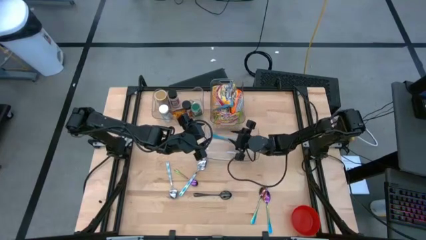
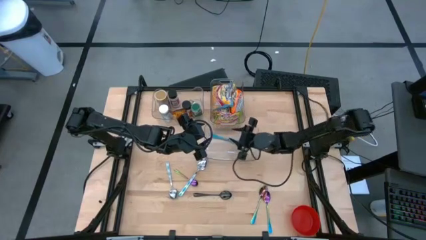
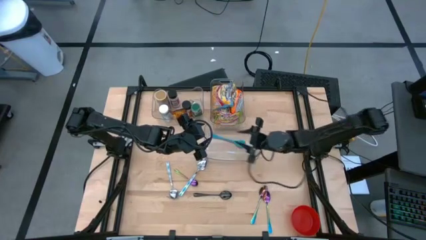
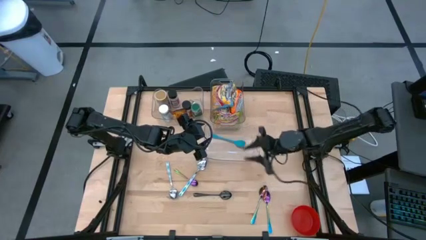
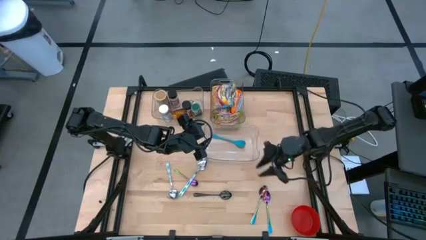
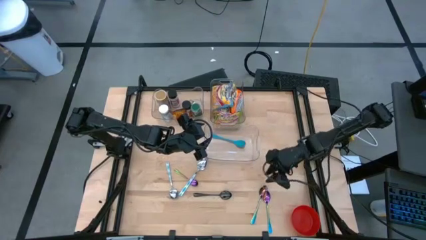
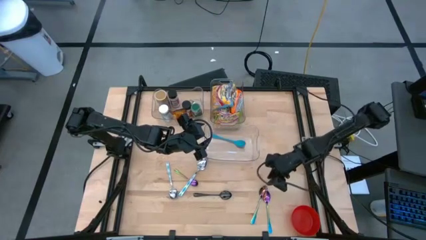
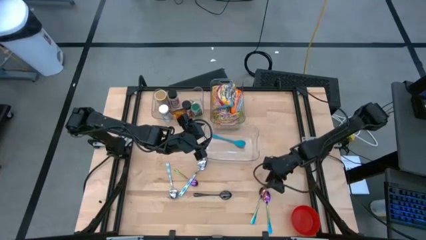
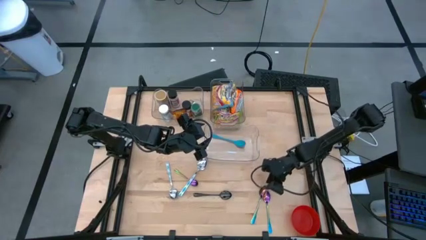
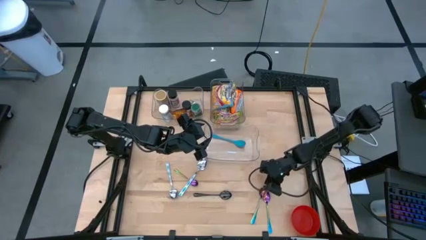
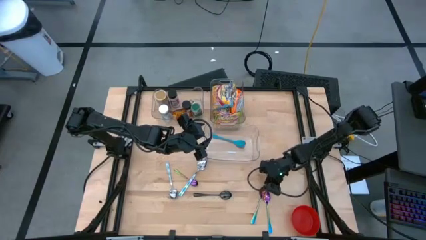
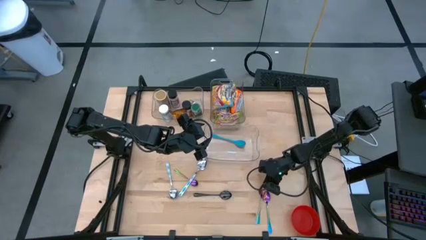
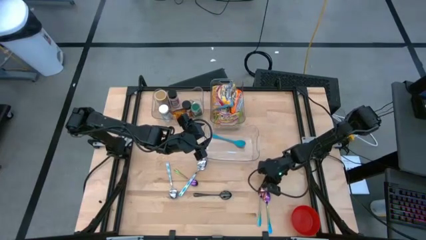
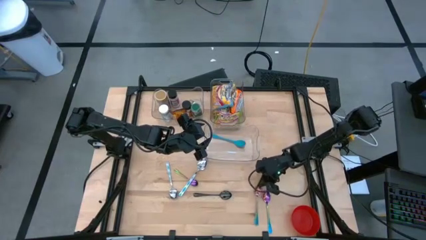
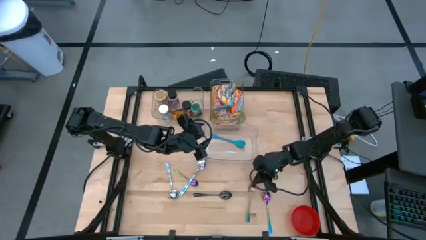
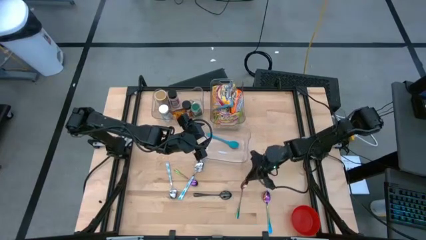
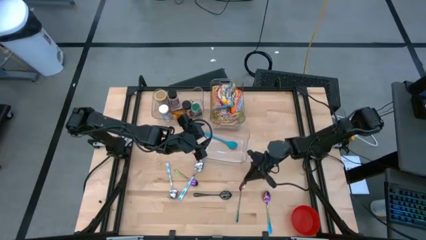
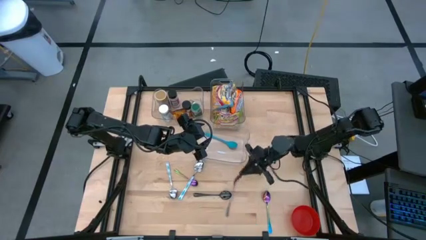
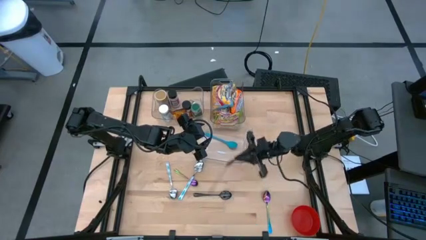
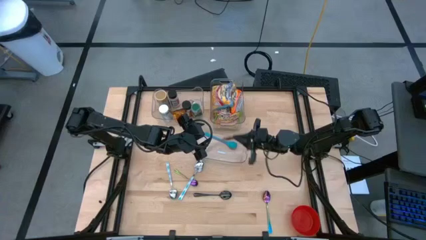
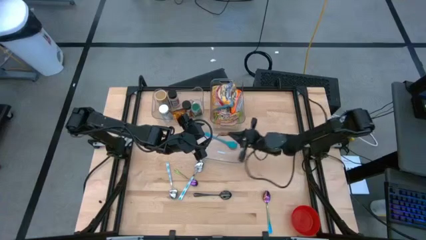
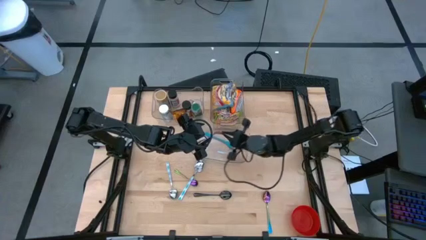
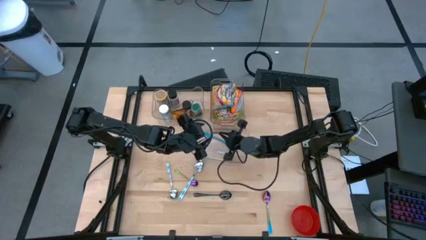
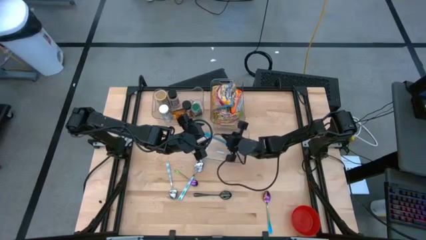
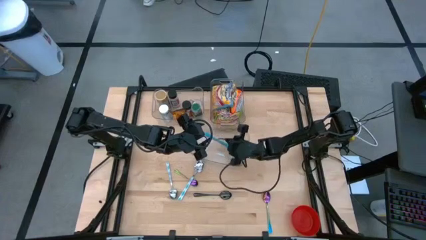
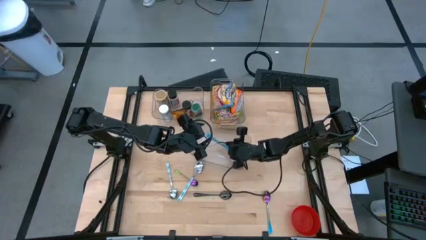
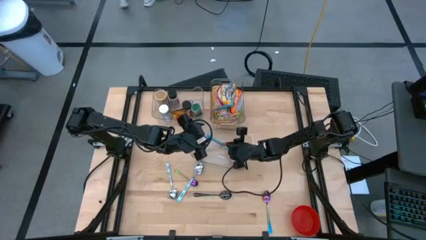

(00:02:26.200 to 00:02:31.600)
Task: Pick & Place Food Item
Put the bottom left purple spoon into the bottom transparent container

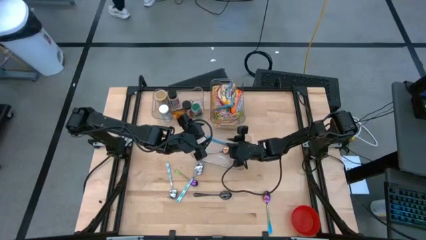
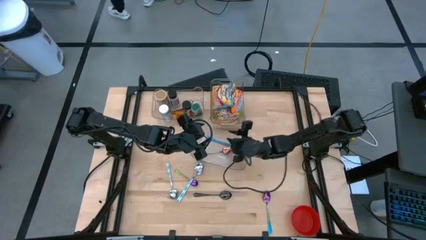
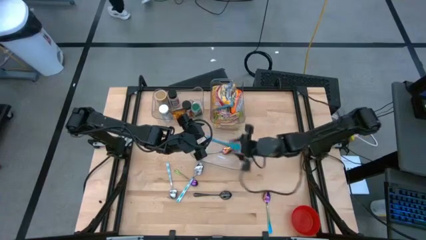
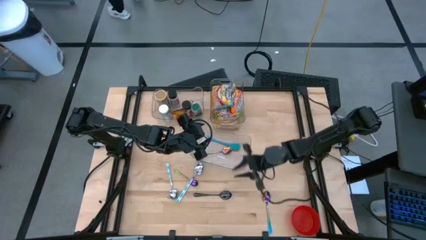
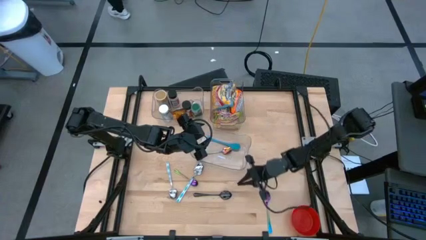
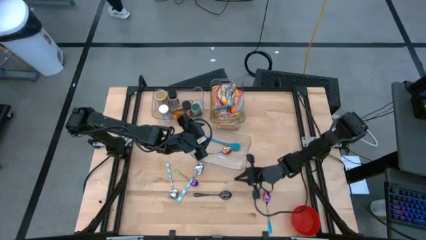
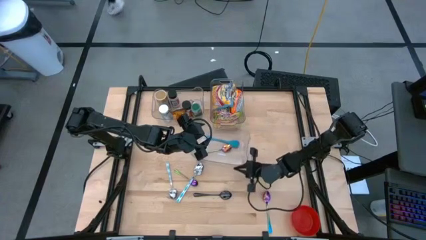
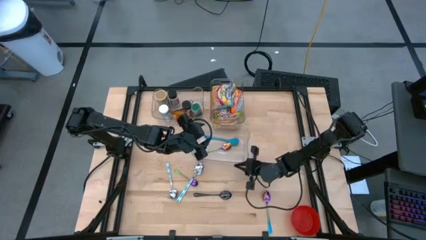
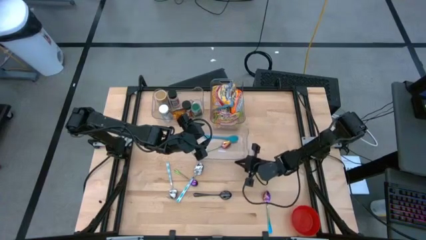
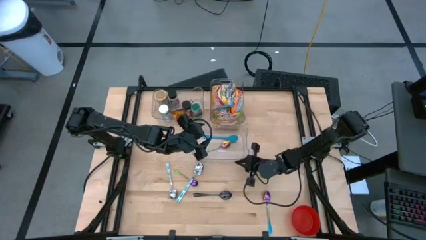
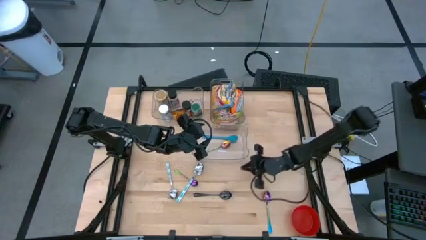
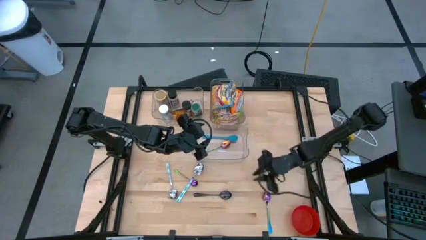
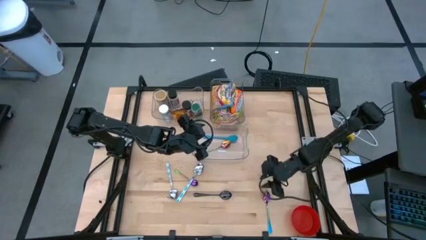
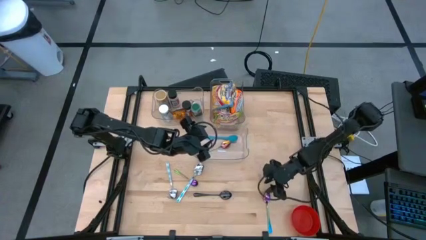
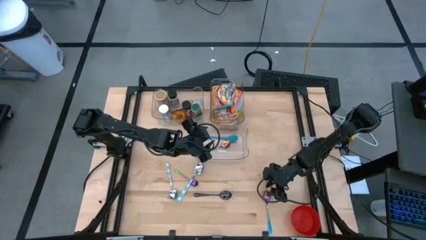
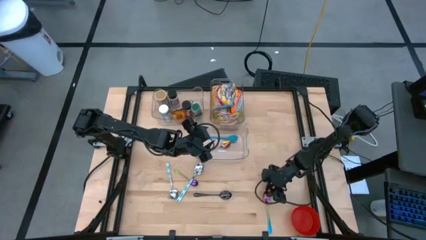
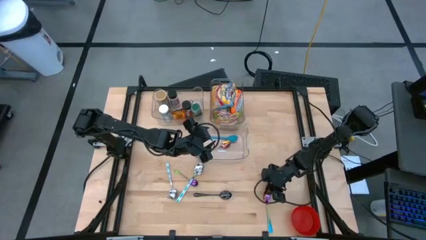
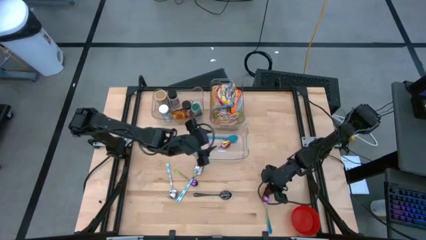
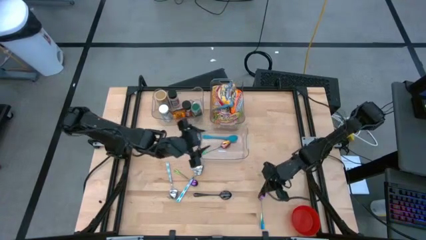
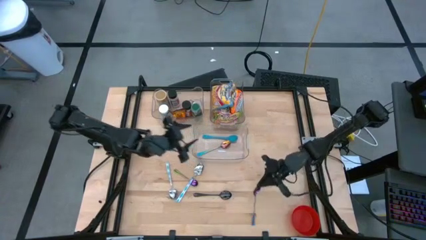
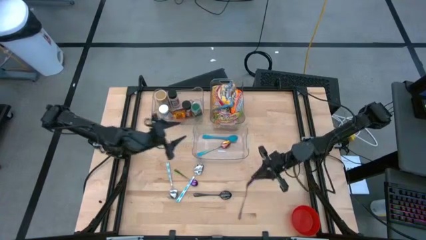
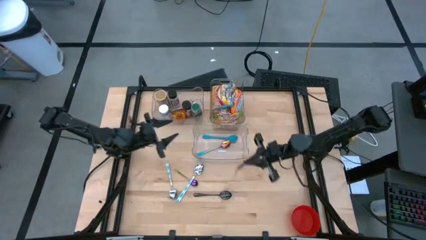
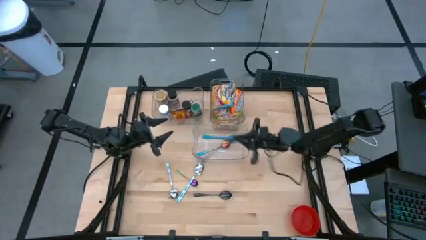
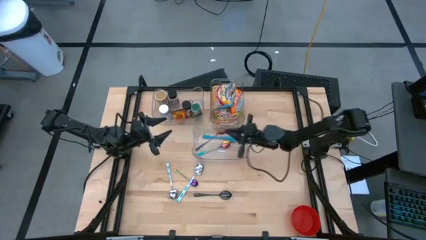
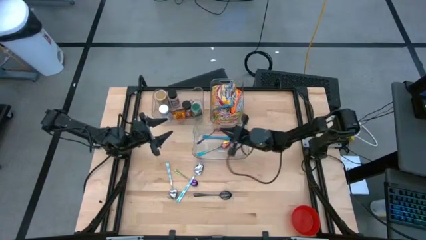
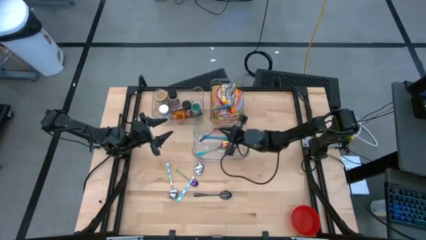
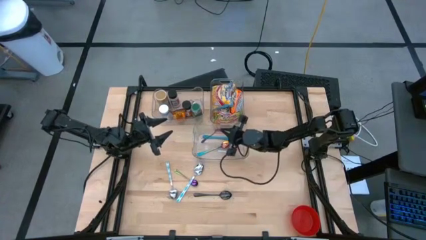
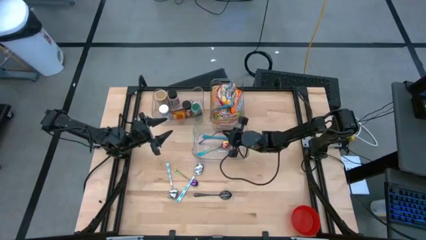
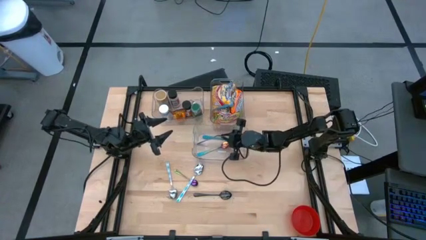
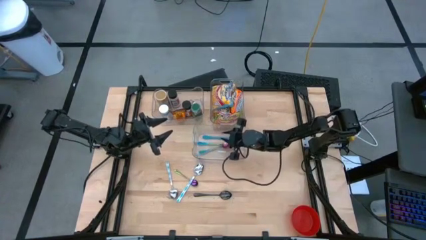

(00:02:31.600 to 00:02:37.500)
Put the bottom purple spoon into the bottom transparent container

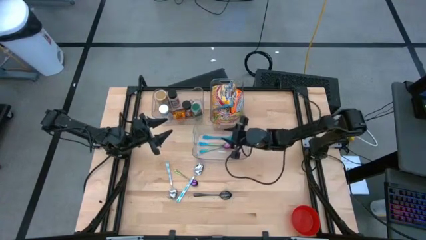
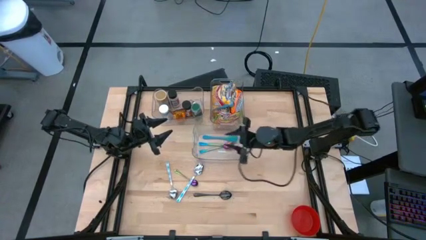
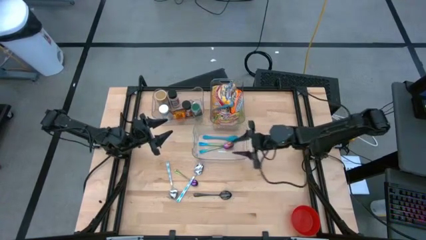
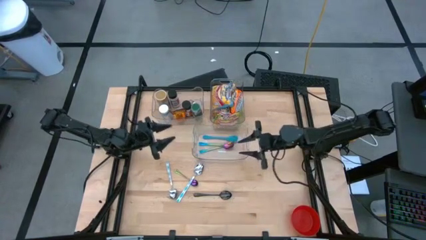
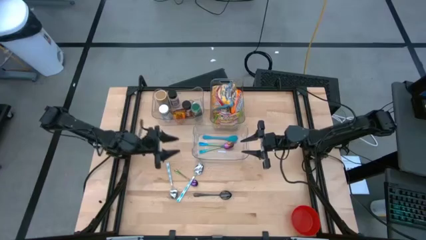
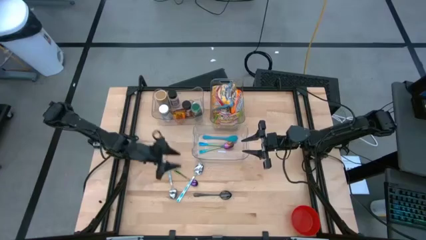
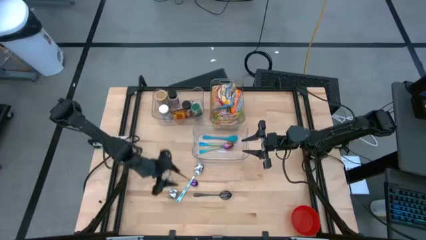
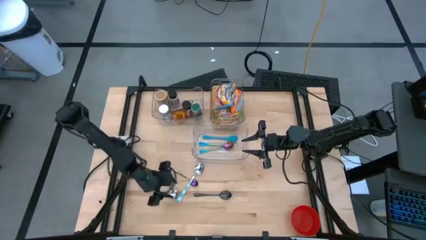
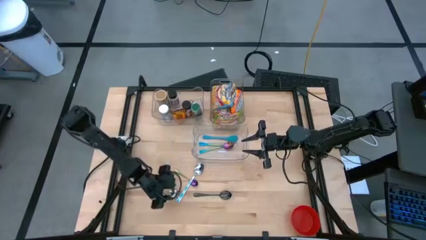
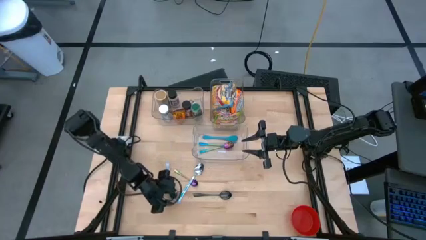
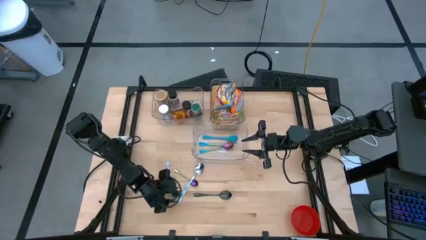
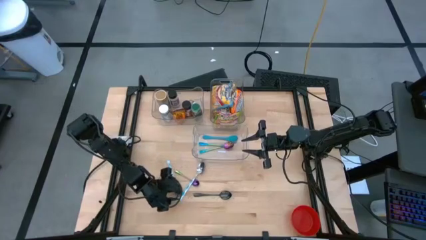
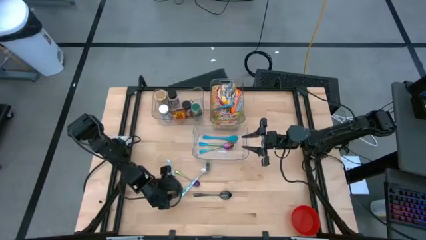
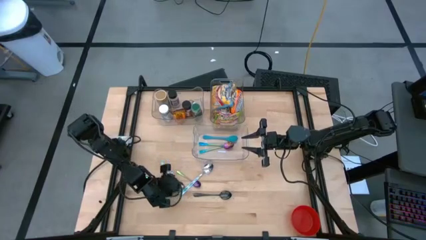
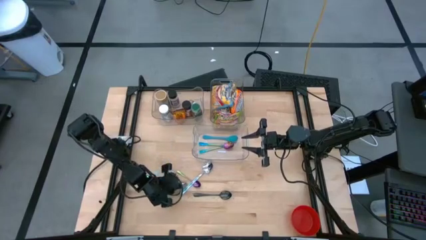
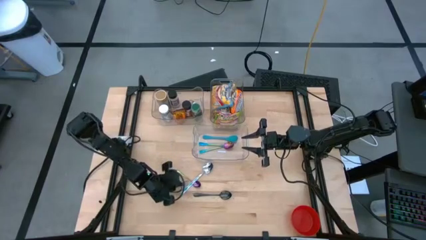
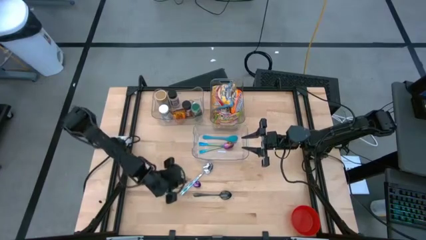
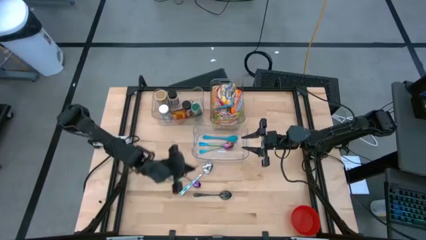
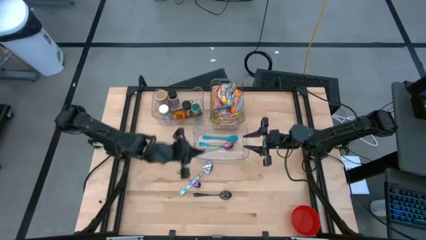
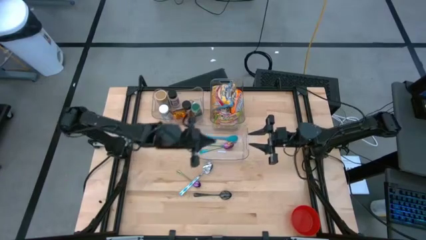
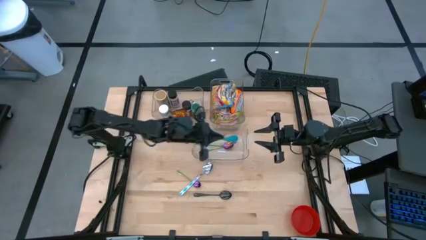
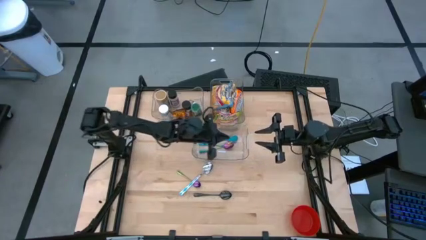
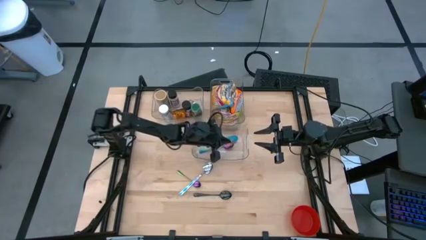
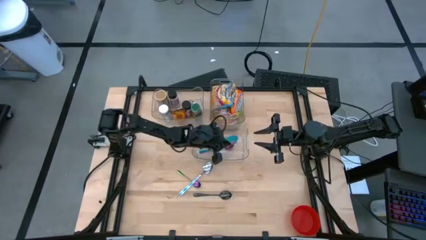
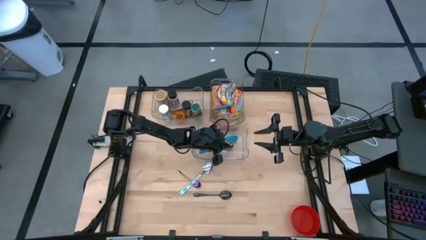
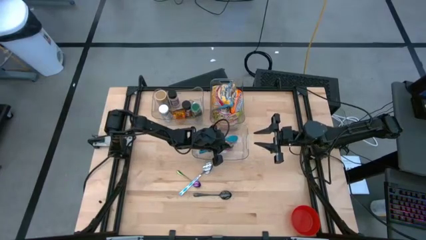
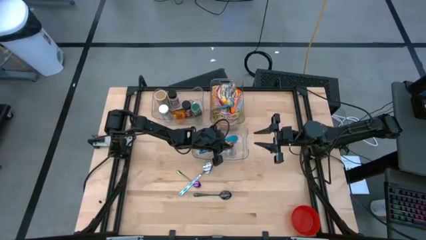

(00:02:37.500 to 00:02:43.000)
Put the left green patterned spoon into the bottom transparent container
